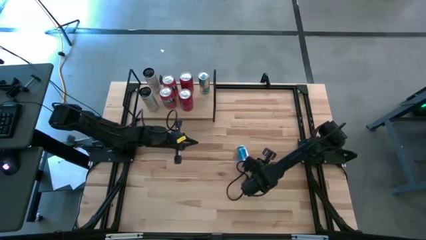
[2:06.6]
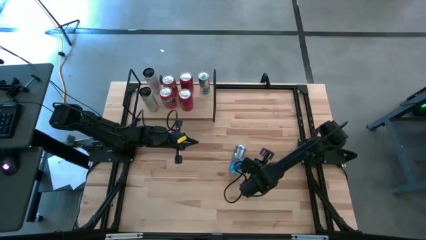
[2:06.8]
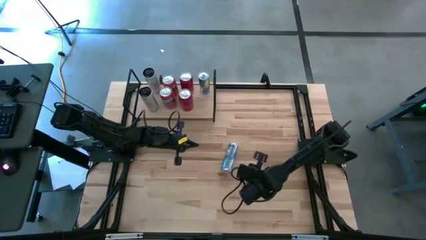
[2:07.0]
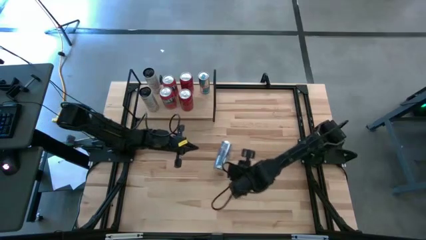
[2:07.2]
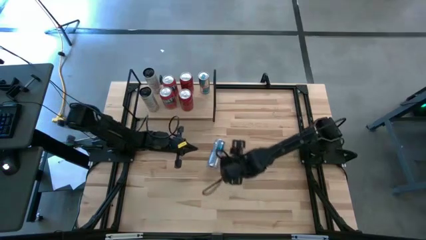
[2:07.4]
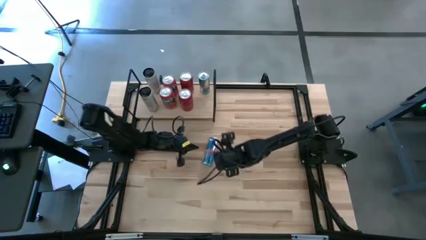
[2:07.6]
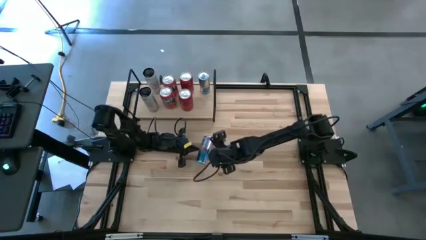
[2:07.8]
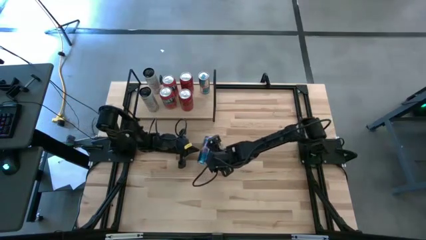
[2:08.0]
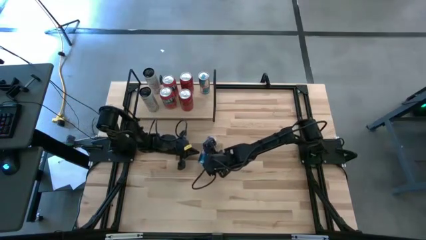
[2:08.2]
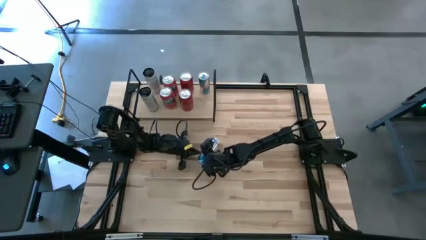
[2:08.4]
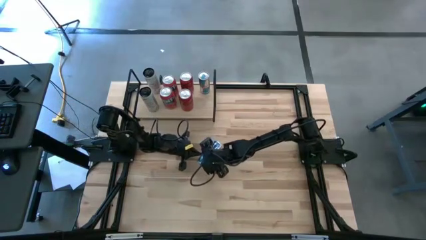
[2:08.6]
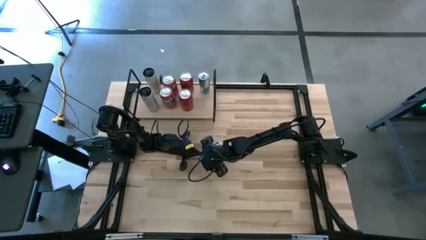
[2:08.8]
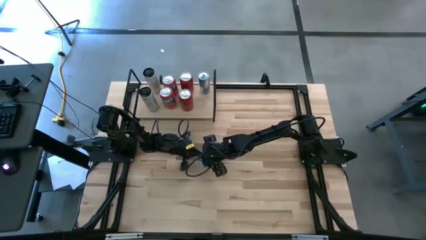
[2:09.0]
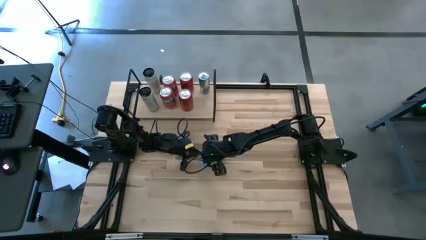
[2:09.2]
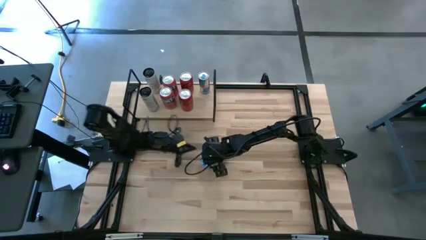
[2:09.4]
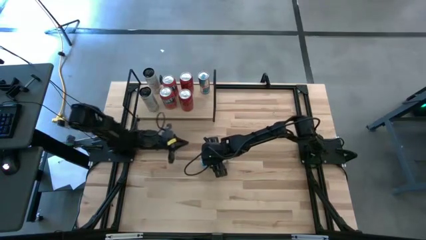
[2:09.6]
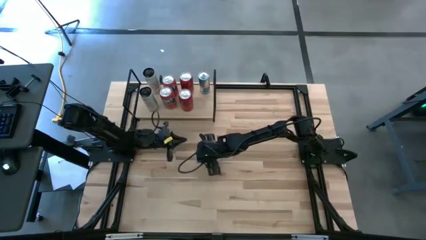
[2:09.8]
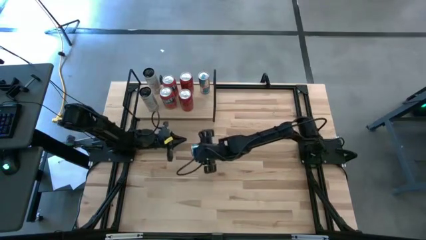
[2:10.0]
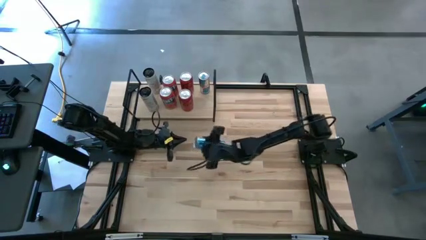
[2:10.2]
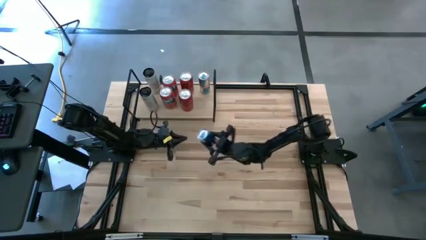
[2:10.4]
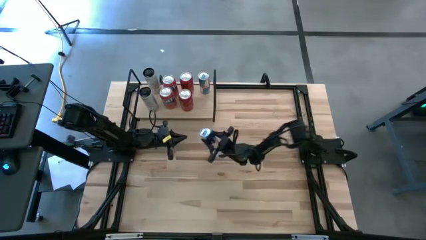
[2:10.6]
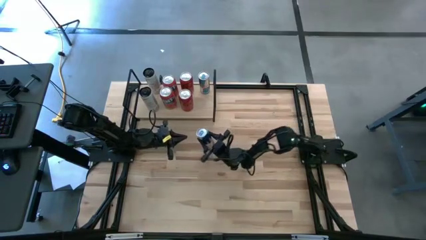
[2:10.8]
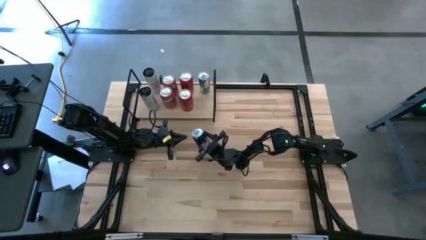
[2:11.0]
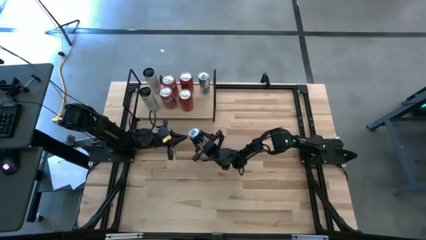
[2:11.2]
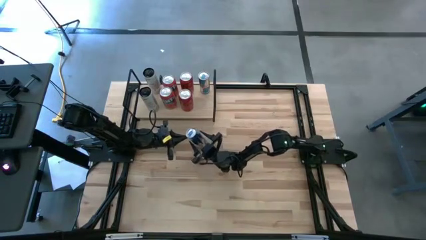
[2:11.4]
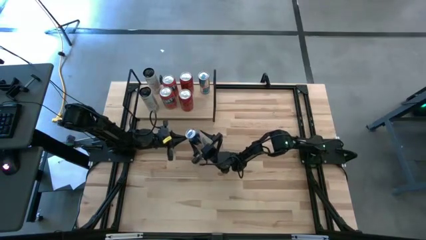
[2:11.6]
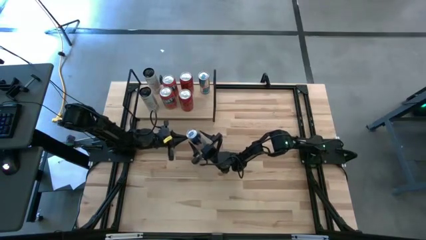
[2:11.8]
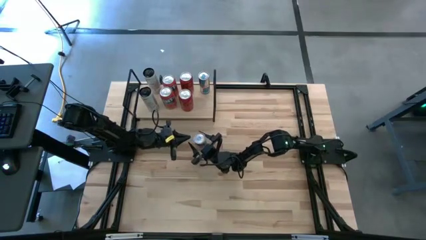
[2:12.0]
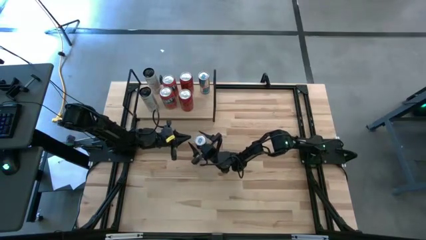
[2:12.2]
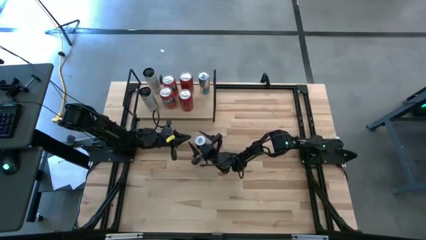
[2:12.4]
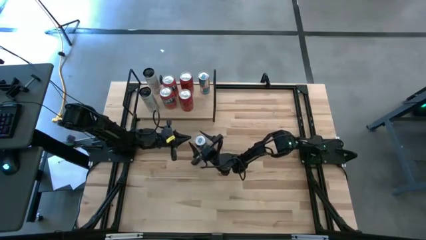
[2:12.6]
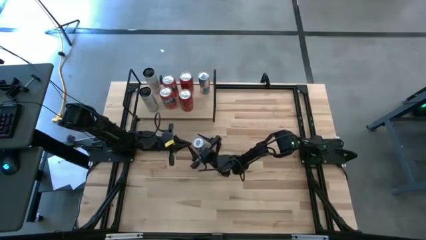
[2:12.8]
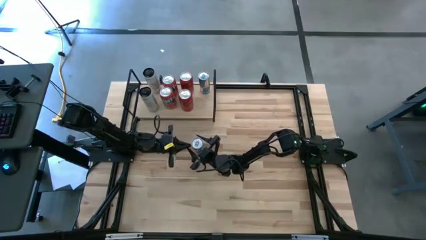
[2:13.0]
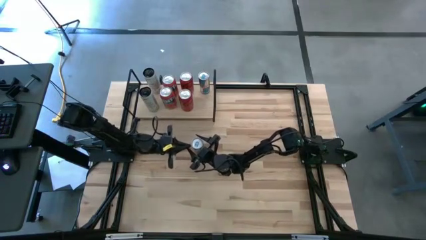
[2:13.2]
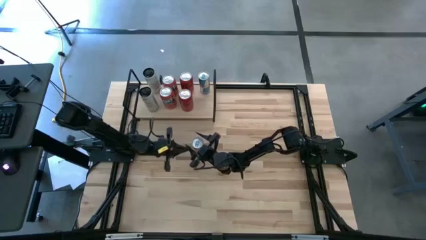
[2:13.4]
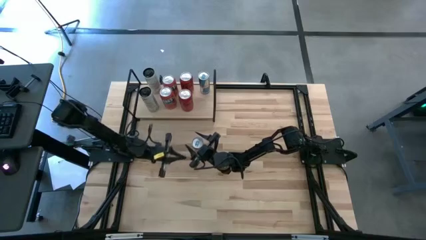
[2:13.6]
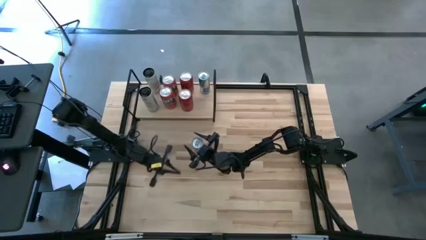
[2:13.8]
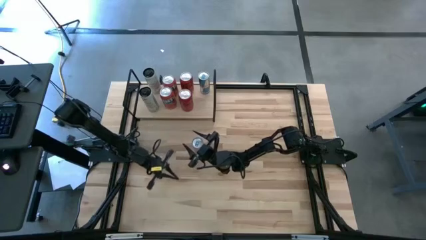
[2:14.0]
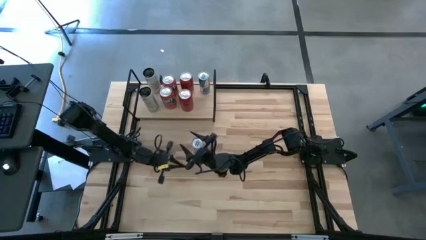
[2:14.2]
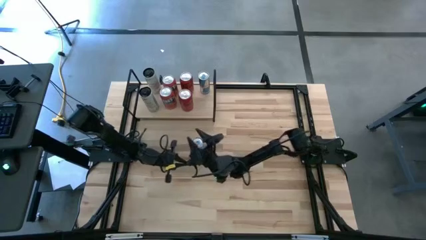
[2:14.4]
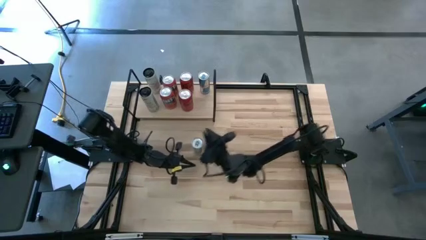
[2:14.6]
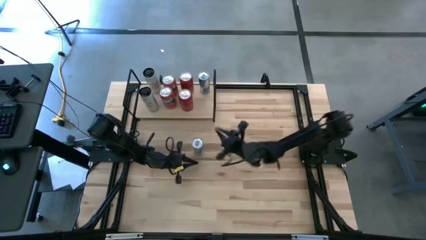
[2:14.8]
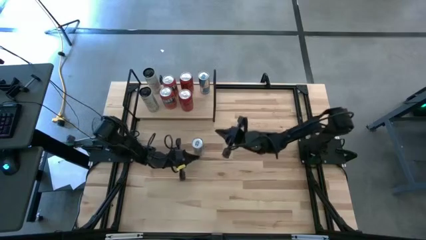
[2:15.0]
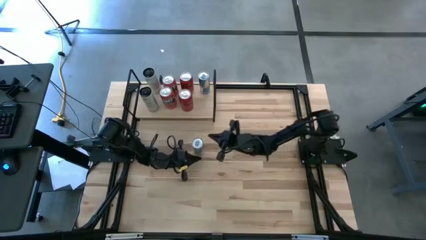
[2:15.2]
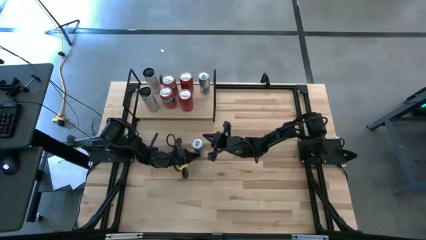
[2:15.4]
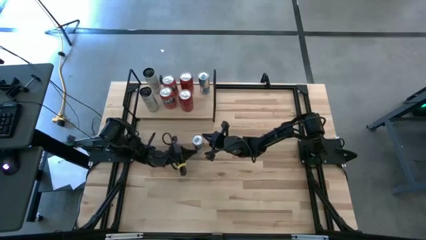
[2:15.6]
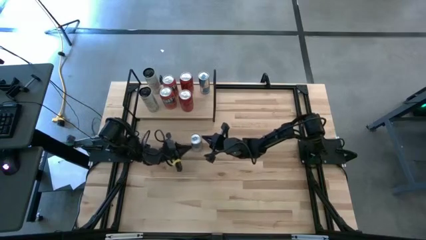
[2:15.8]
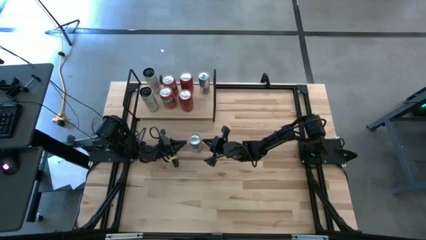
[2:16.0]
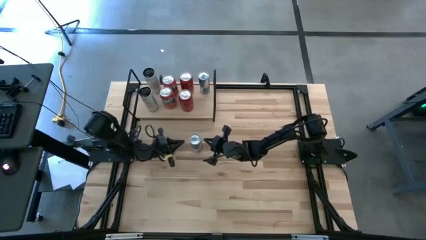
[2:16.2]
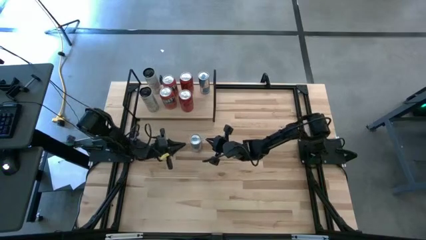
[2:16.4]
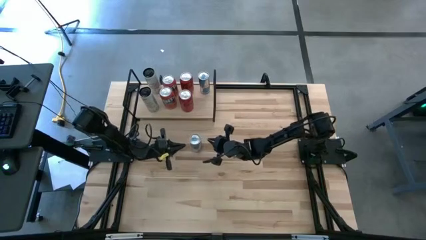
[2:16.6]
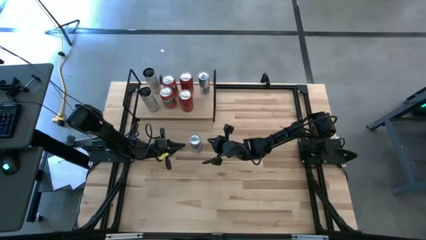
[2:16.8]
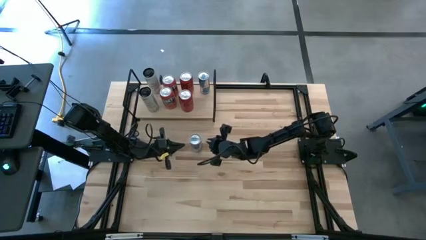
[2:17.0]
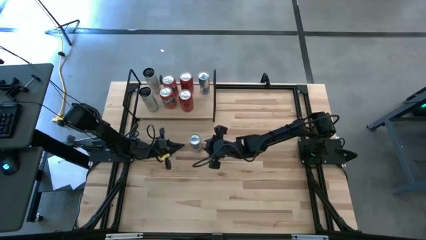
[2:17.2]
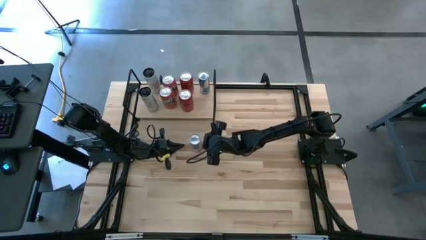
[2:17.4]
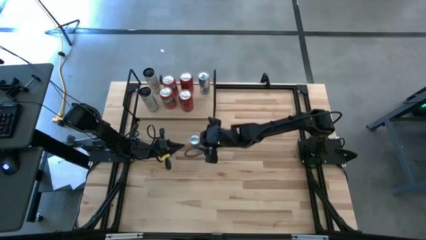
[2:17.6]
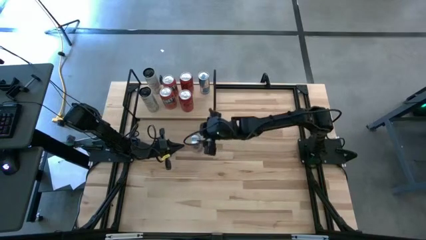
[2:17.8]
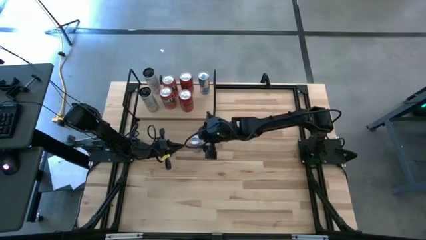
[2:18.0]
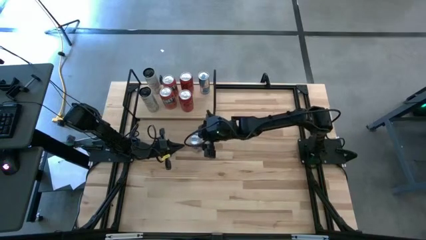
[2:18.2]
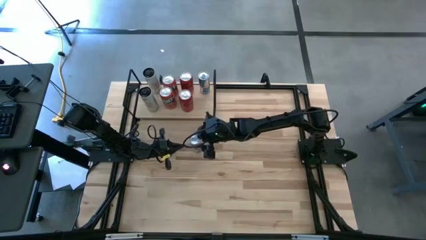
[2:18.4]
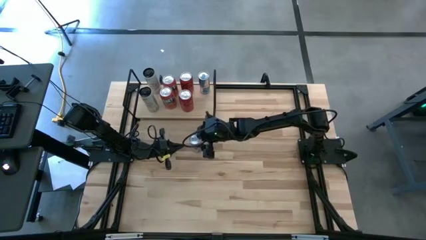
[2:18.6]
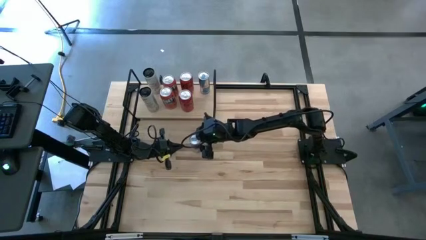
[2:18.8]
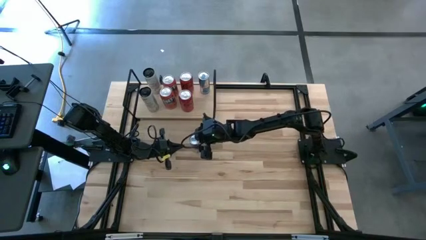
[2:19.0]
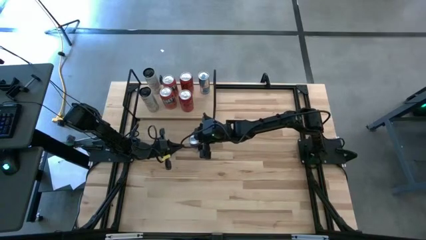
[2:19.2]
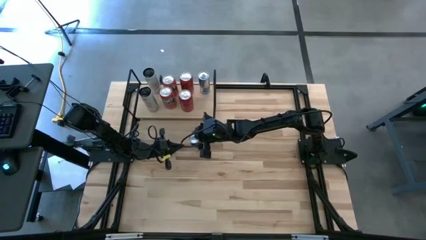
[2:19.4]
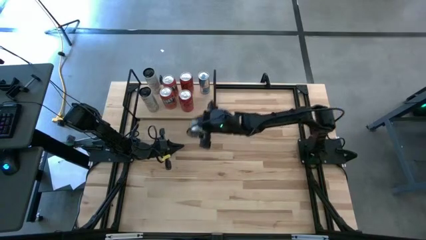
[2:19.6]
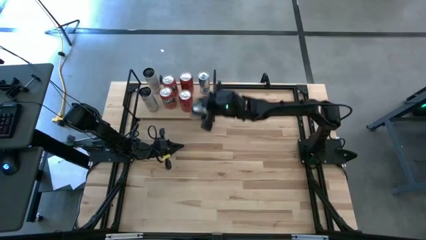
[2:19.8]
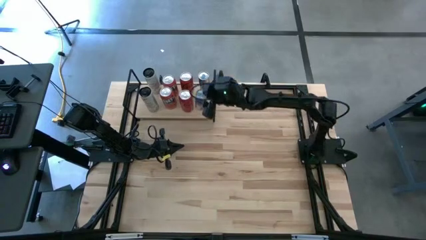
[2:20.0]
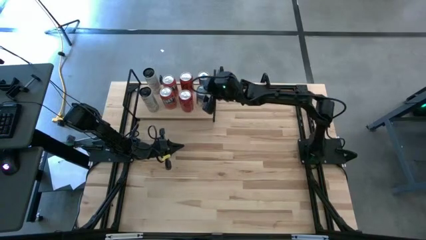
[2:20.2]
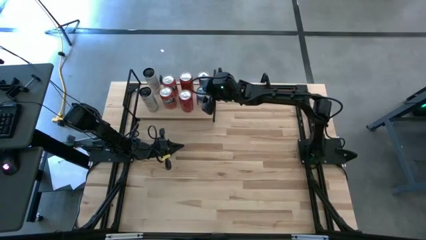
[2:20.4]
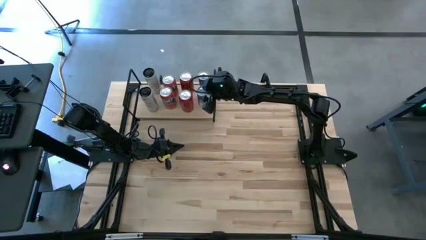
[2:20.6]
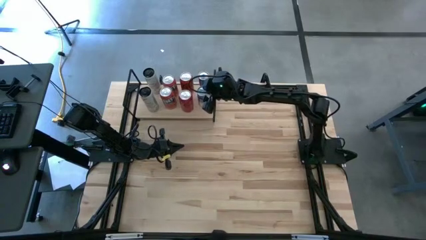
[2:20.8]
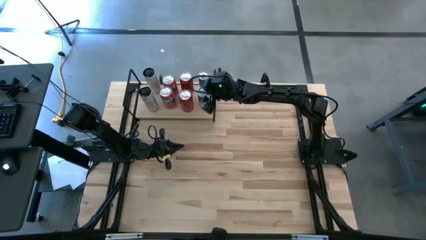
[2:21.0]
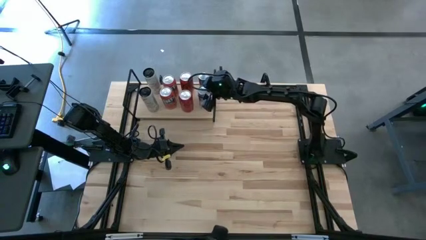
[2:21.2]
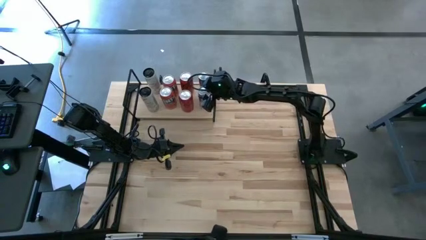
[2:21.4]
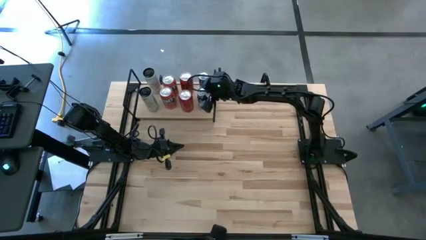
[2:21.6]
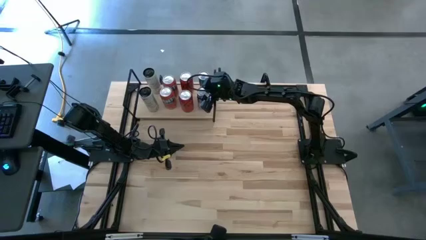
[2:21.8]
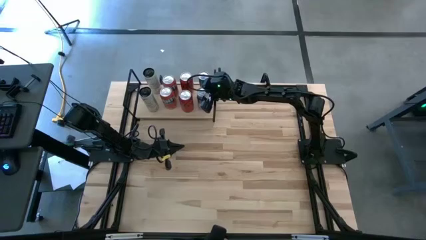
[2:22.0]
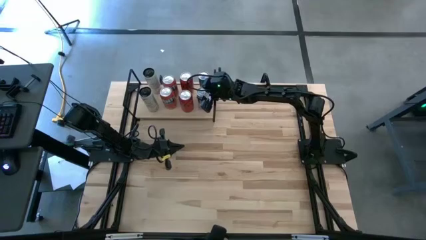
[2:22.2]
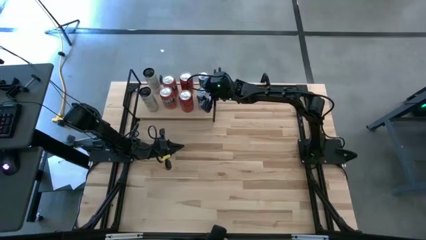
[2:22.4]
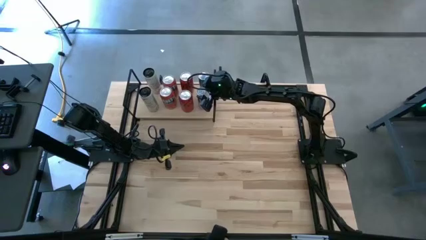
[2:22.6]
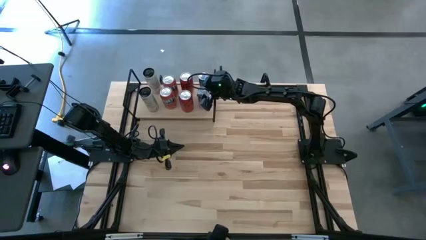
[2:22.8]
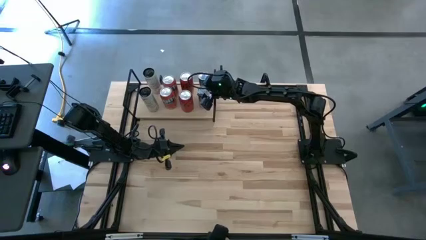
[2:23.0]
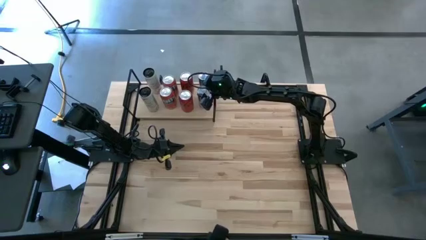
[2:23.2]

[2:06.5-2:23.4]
Task: Place canned beverage on shelf
Put the blue soda can aligned with the other blue soda can on the shelf
